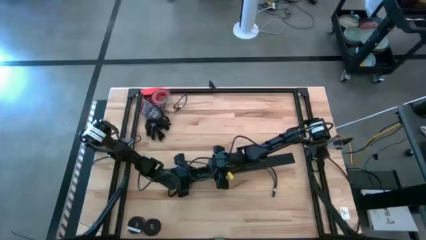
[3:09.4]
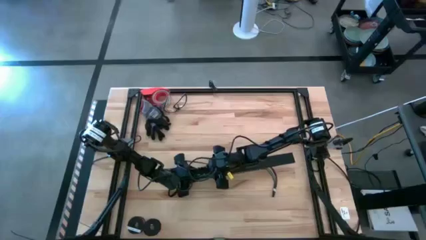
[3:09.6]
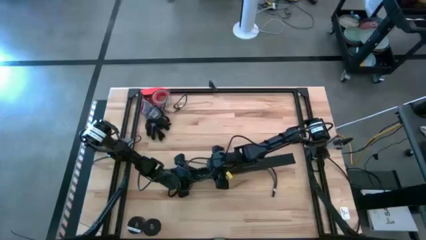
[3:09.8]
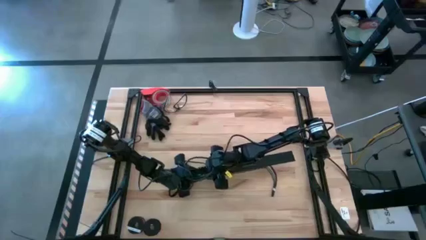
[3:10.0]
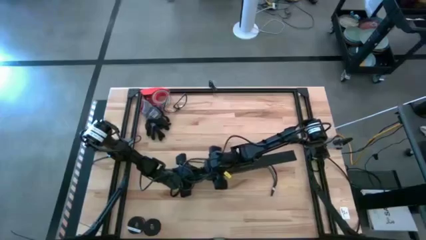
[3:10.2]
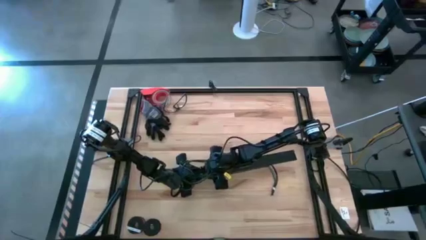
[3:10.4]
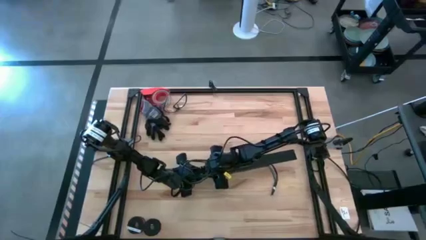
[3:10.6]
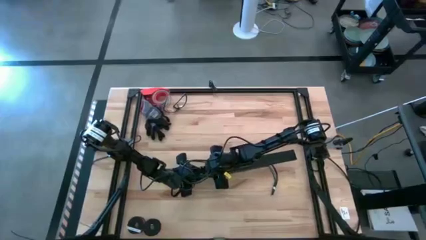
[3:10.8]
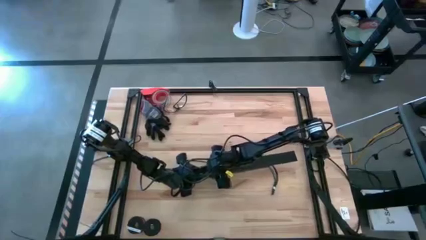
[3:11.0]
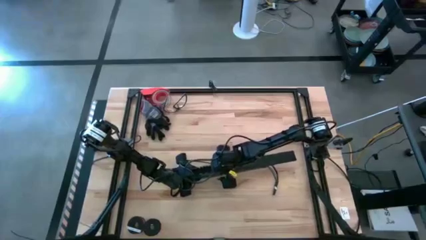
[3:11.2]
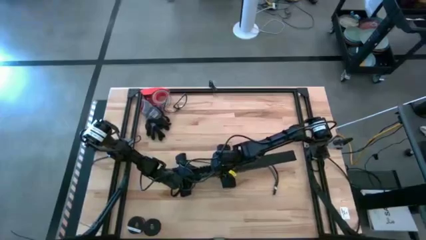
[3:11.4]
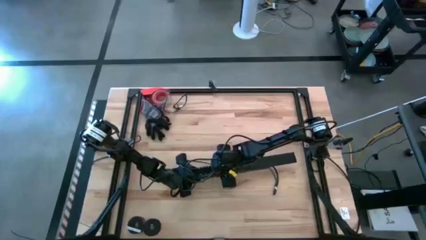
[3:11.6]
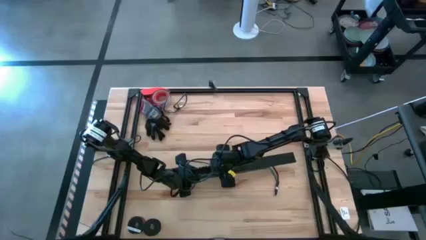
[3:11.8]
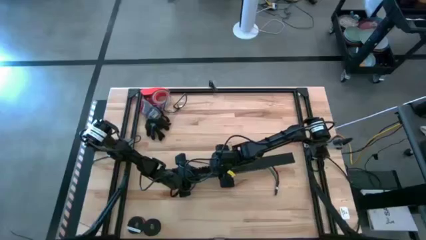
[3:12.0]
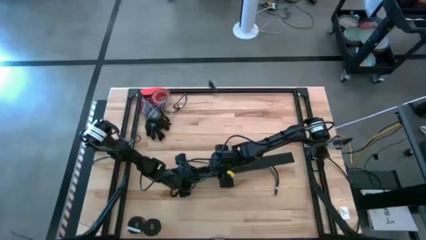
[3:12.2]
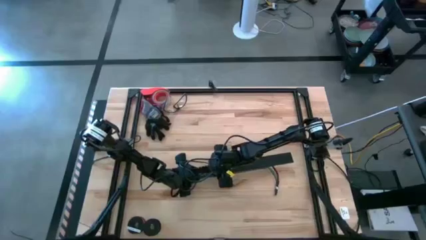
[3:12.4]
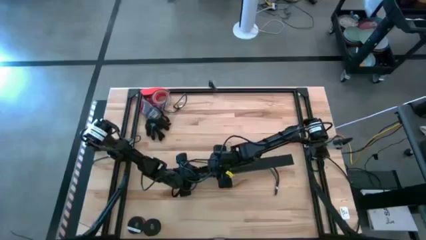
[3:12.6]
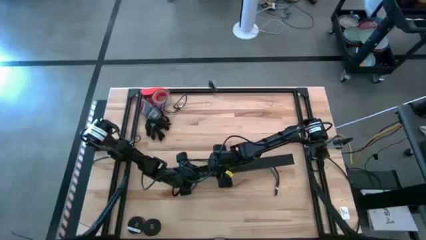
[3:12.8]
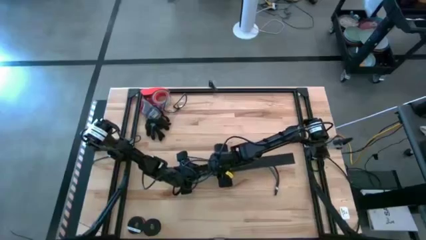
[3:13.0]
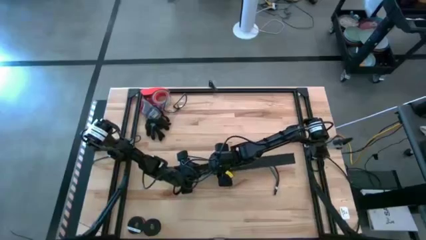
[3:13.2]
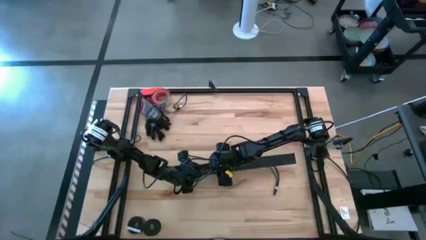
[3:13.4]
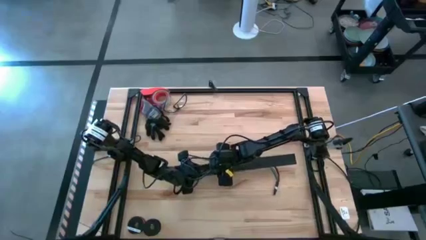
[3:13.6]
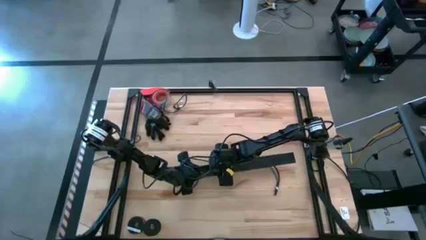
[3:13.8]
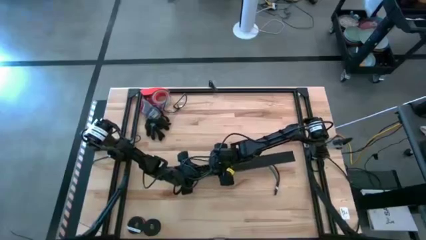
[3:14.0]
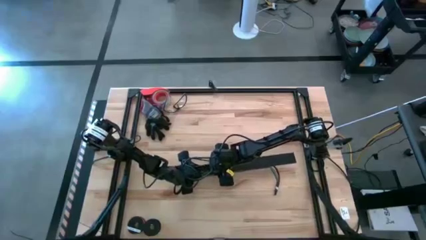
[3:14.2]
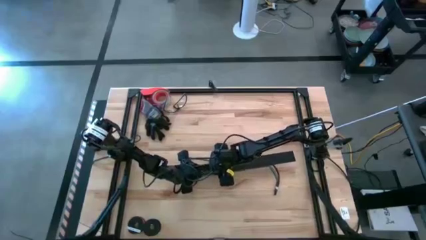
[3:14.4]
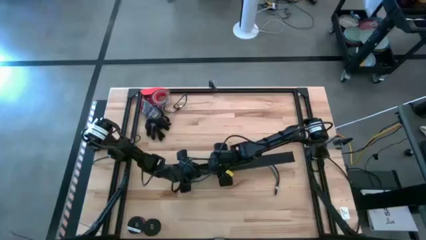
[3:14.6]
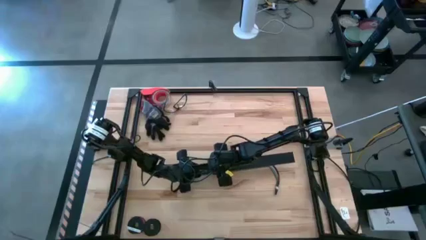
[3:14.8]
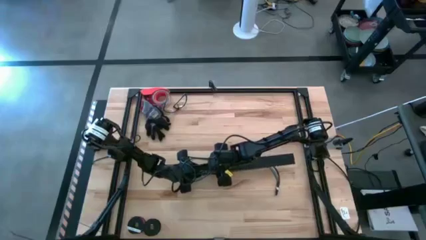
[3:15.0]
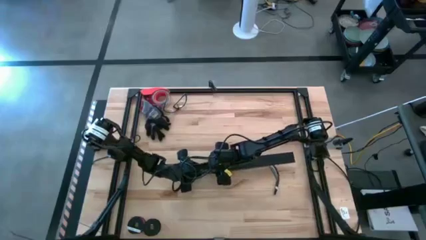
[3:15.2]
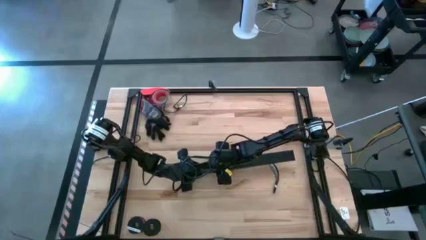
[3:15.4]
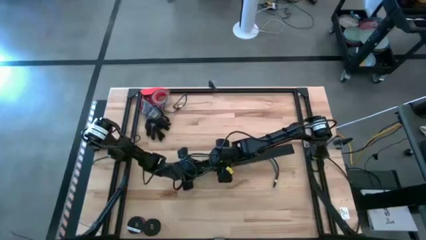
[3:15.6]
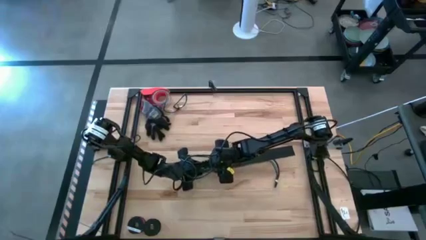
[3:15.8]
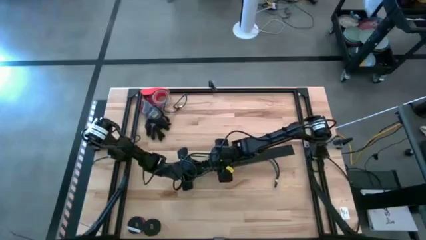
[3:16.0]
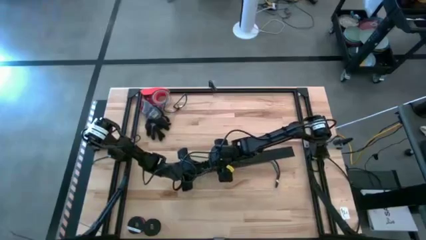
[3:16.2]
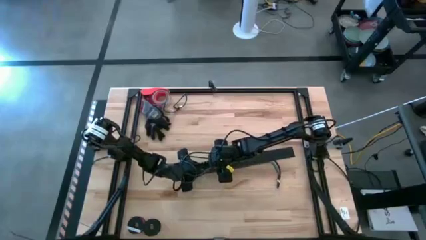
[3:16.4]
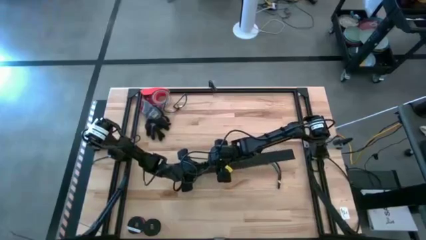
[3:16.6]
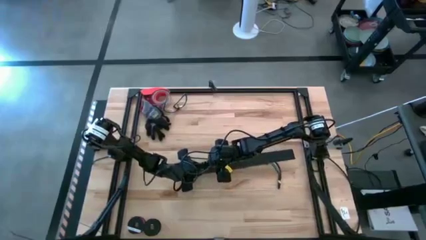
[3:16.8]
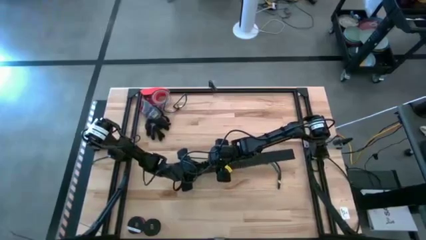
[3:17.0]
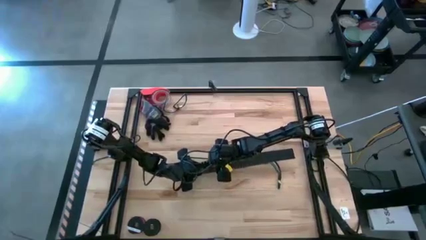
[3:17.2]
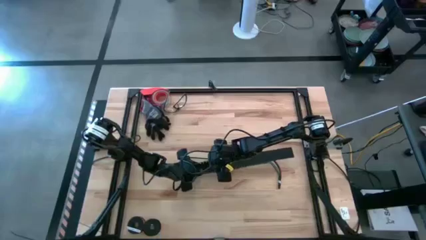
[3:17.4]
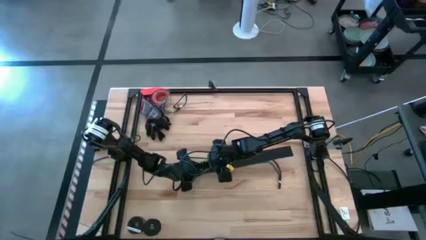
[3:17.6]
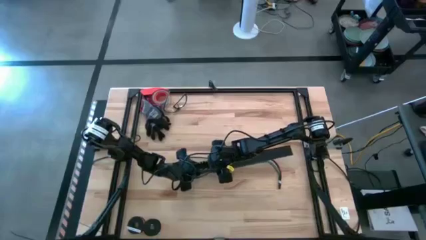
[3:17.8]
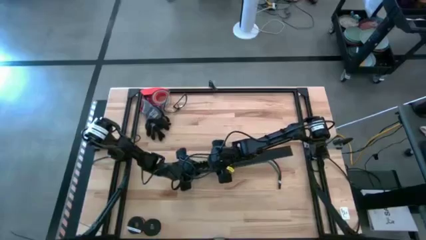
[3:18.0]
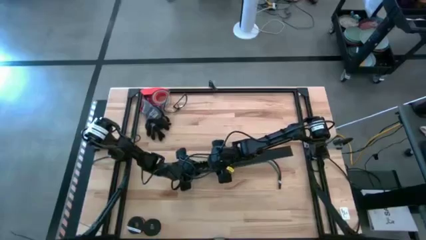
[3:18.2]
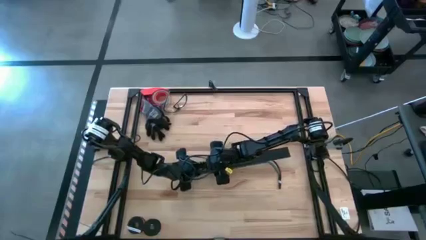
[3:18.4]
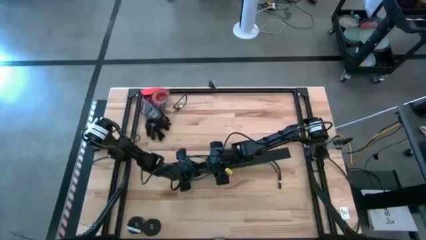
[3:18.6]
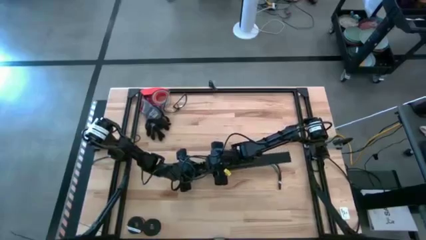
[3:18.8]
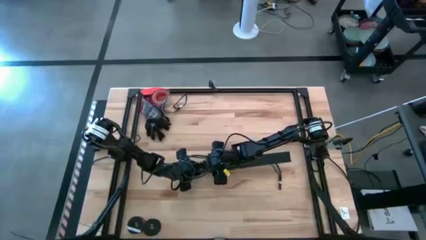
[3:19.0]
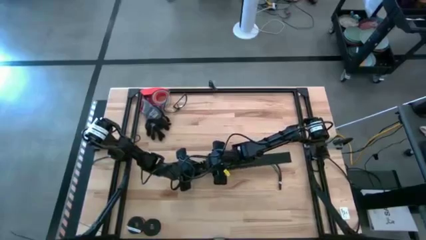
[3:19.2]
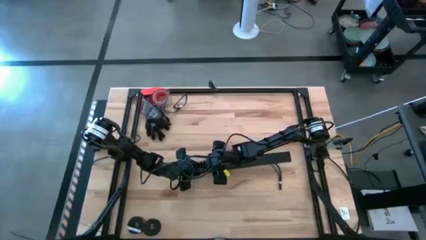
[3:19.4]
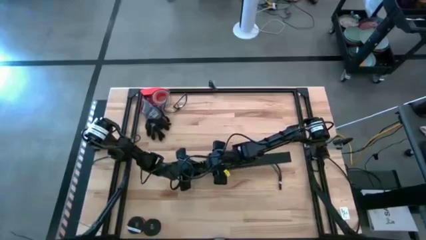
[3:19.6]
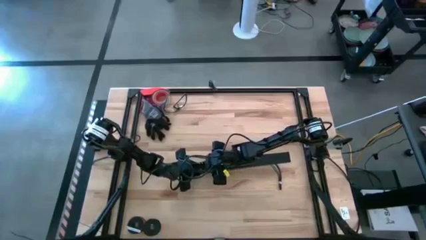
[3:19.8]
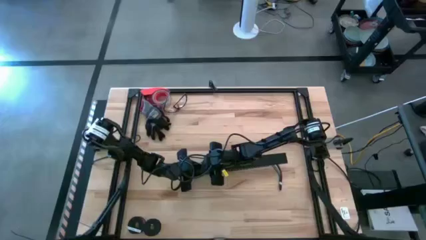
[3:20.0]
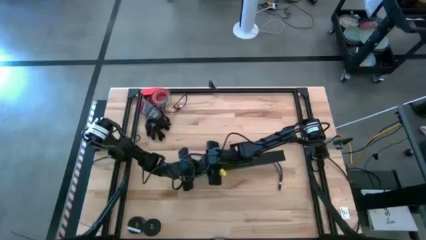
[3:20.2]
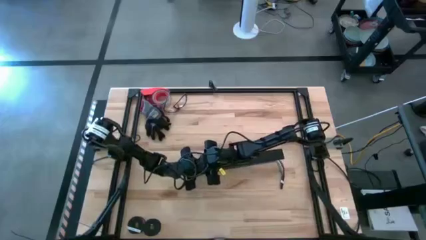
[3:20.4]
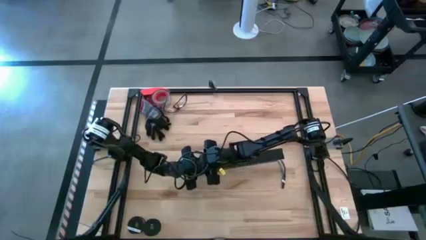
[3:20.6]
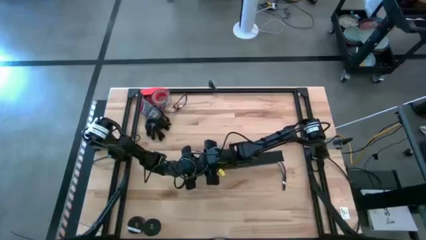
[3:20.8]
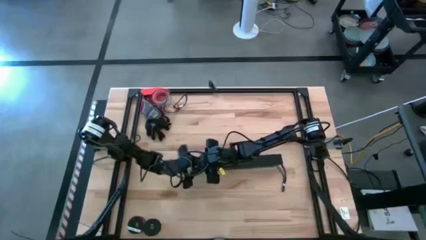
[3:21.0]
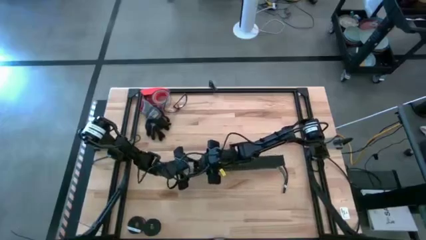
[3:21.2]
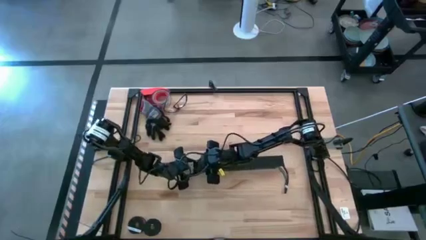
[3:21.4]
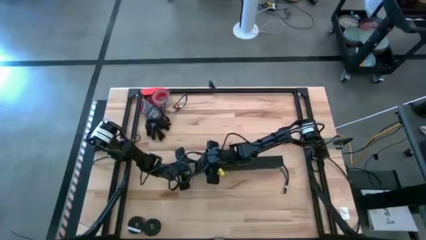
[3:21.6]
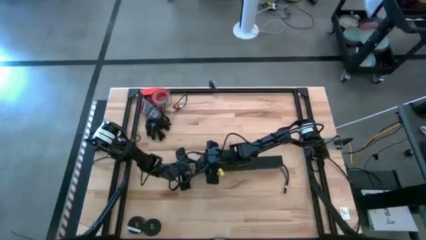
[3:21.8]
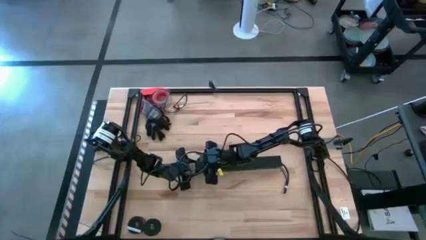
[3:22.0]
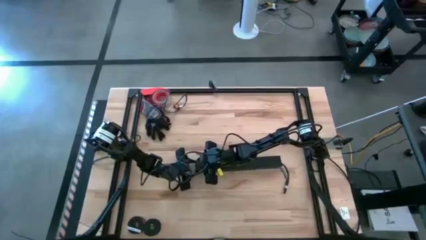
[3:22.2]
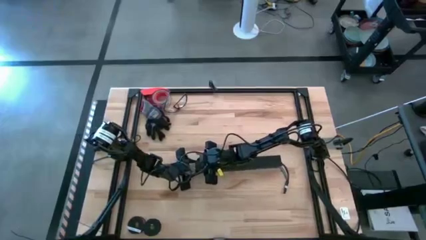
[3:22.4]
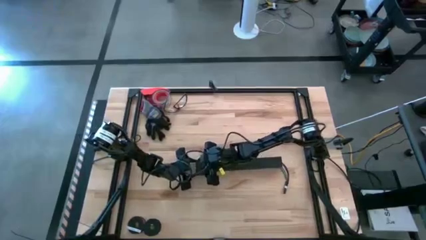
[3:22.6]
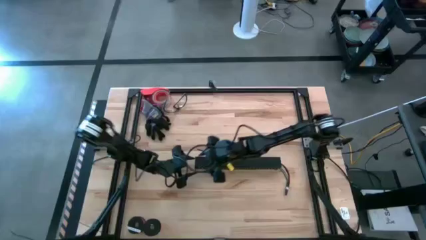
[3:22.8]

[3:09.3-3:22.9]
Task: Ziptie cables
Close the black cable duct

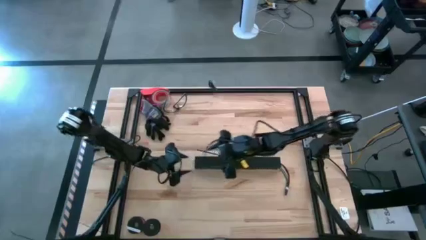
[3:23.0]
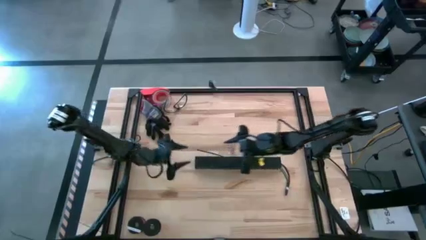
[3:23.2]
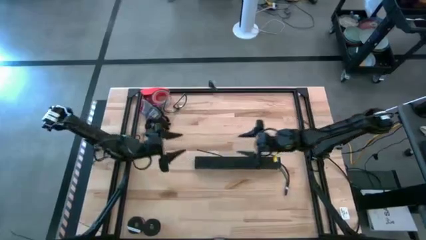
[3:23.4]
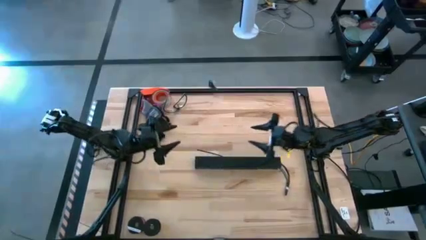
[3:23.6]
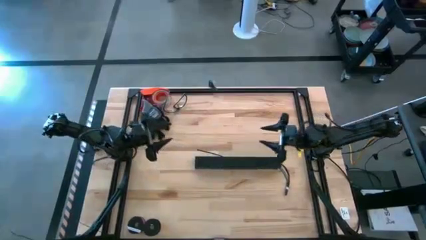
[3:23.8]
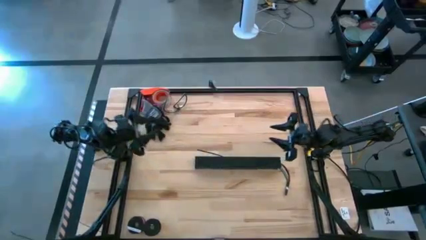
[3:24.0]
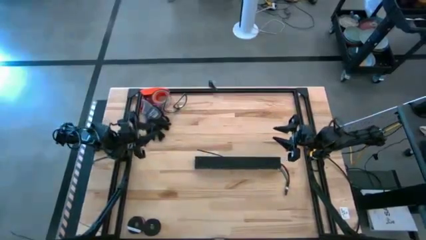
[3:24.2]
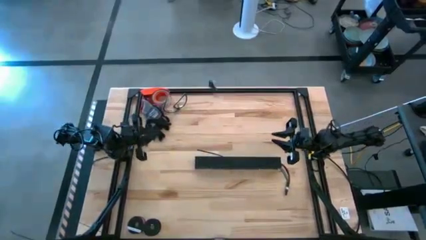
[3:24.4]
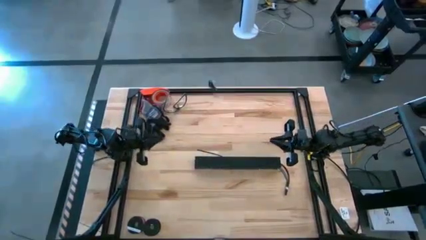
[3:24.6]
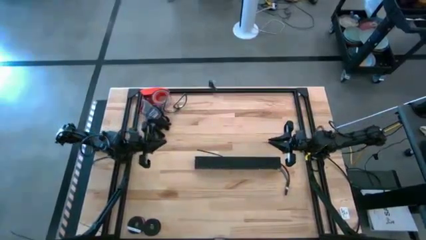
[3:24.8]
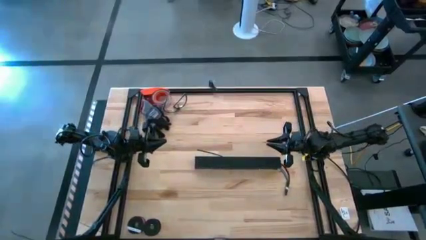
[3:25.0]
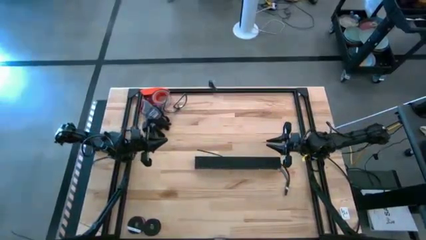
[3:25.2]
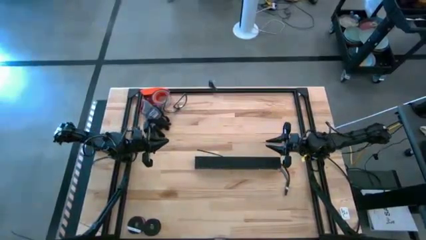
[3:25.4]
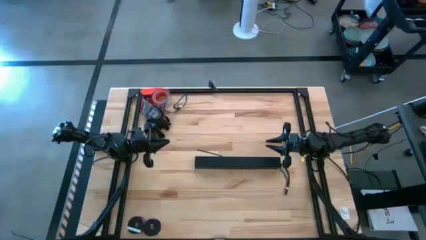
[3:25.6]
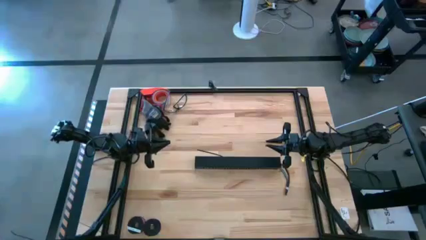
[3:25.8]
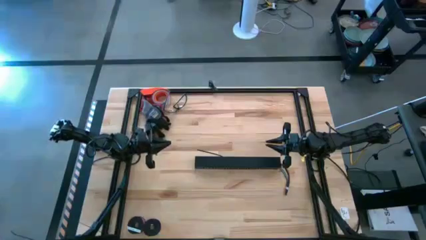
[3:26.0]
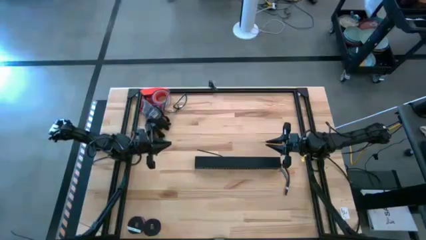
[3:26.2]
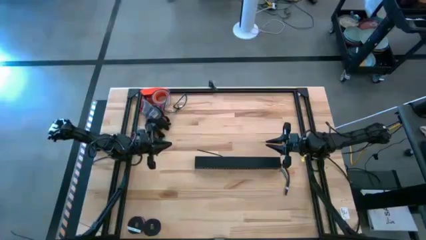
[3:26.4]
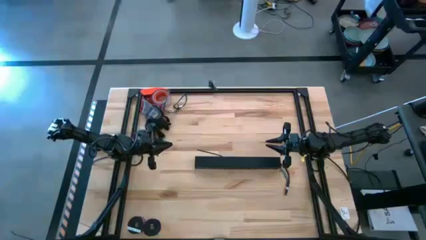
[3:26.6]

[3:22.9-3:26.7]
Return to Home Position
